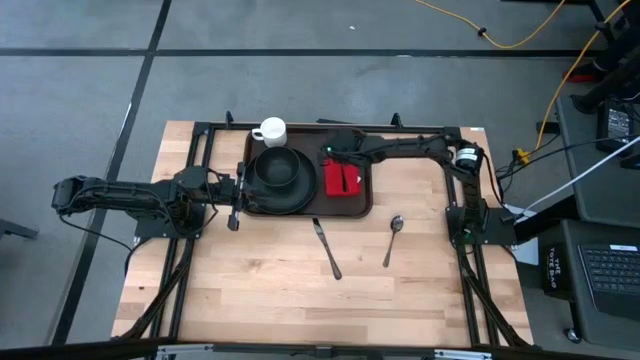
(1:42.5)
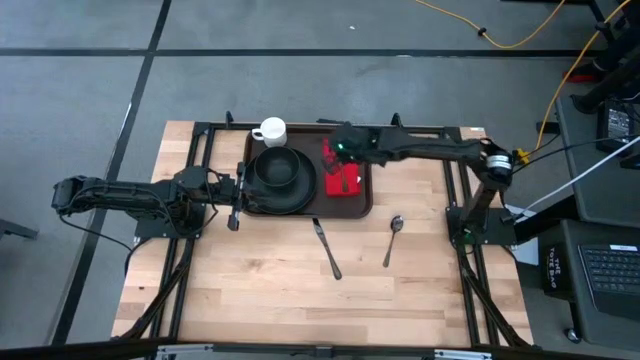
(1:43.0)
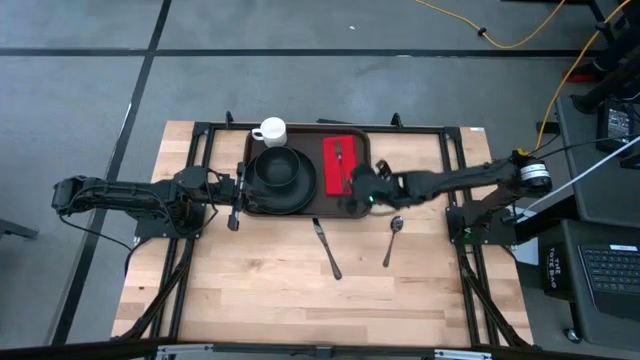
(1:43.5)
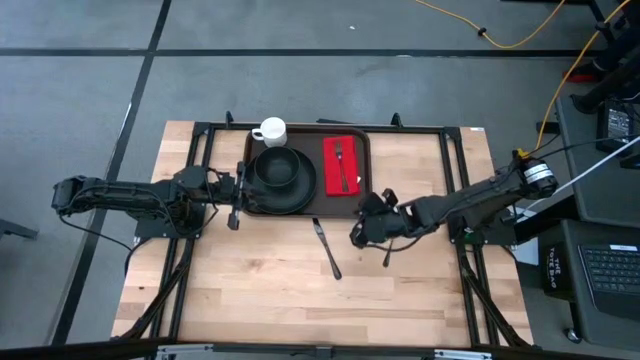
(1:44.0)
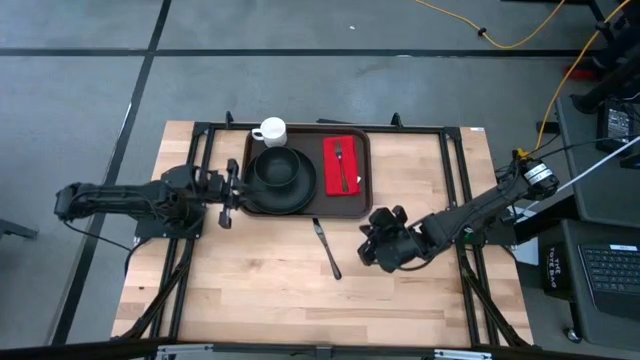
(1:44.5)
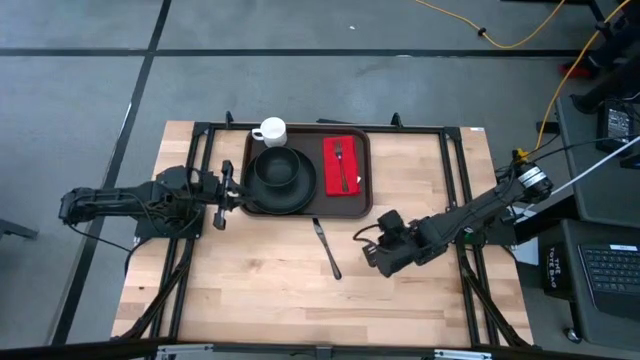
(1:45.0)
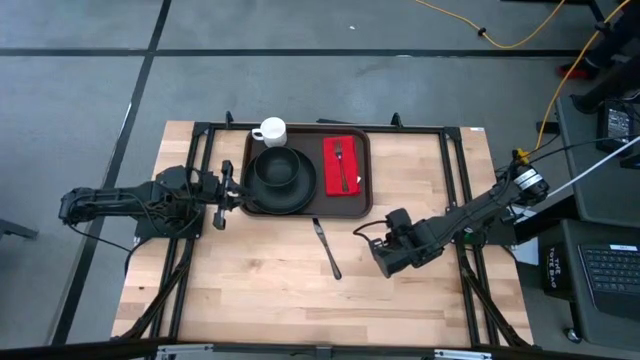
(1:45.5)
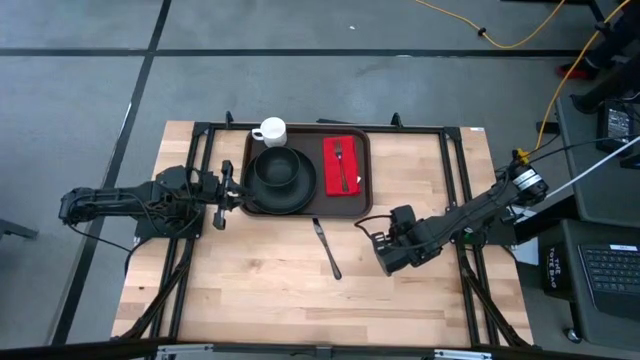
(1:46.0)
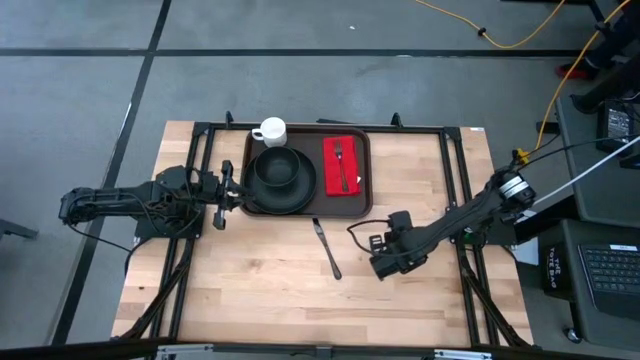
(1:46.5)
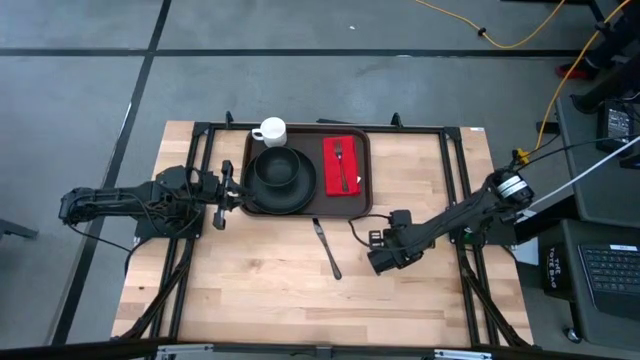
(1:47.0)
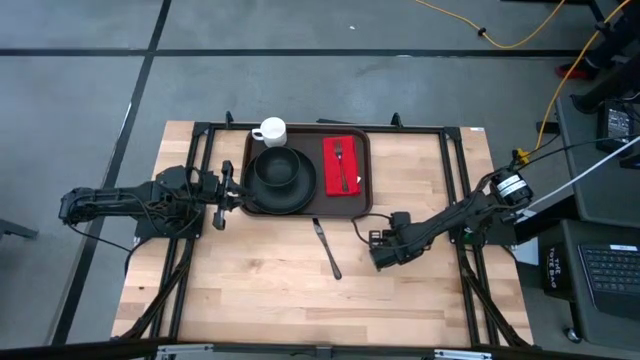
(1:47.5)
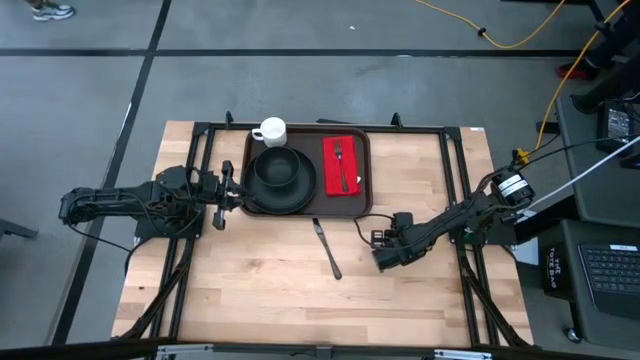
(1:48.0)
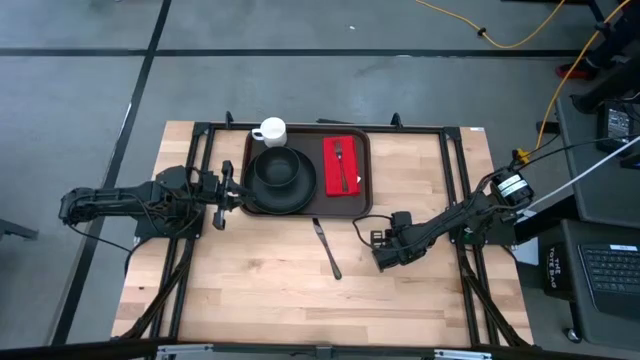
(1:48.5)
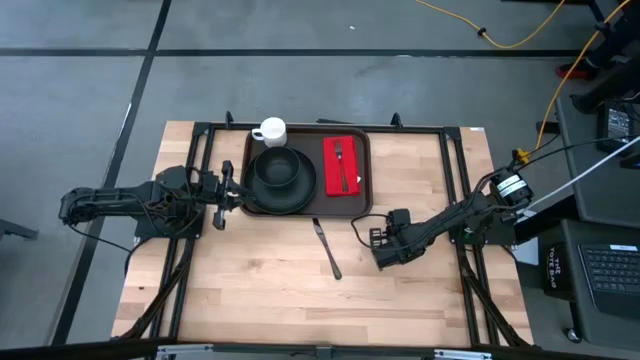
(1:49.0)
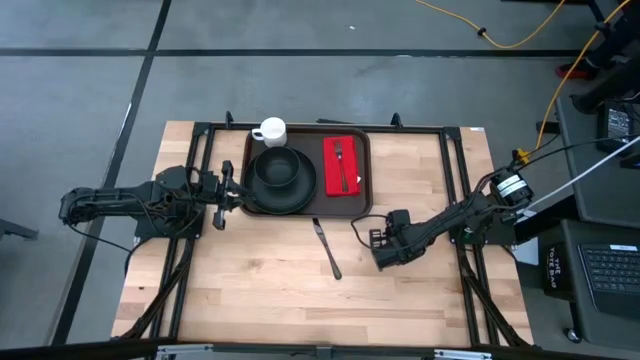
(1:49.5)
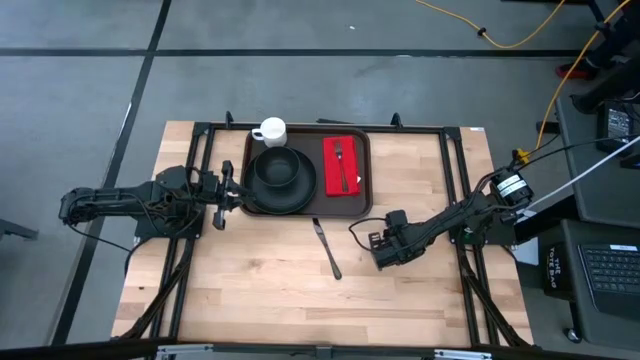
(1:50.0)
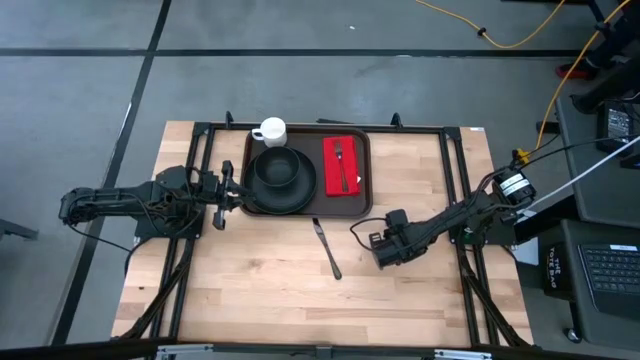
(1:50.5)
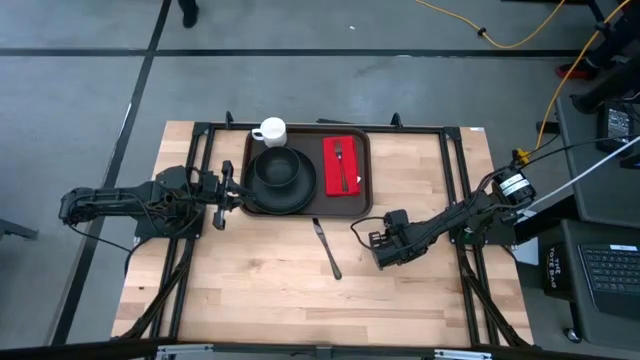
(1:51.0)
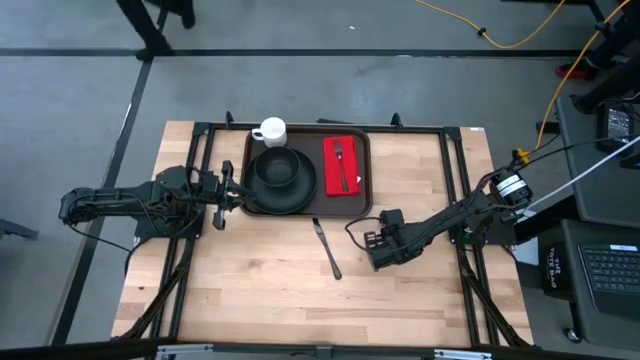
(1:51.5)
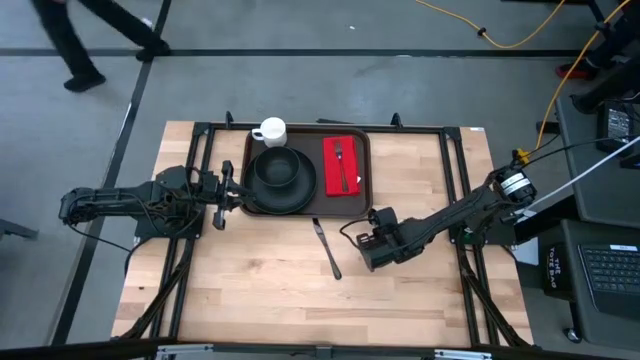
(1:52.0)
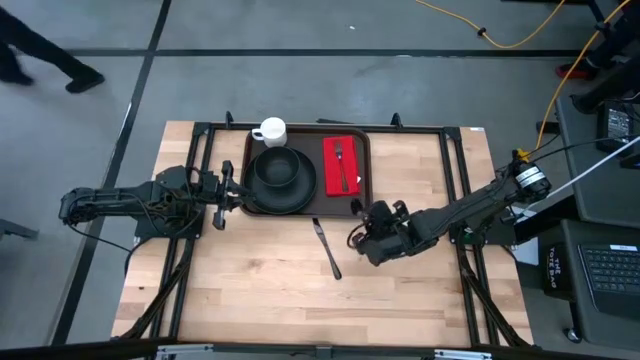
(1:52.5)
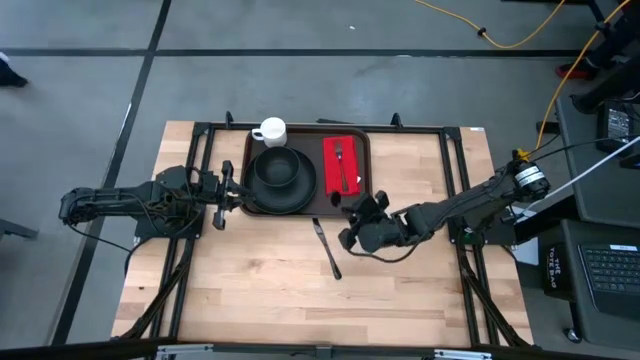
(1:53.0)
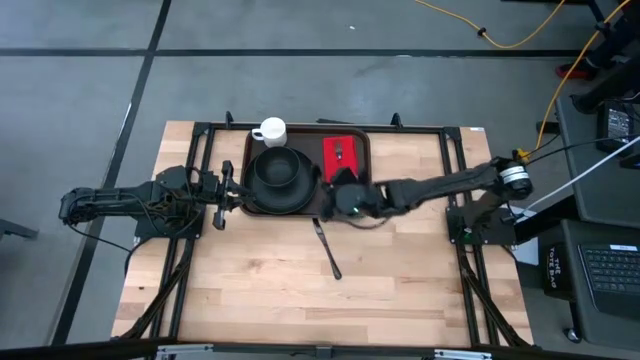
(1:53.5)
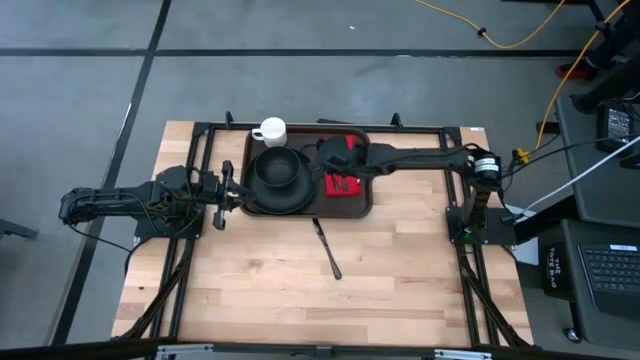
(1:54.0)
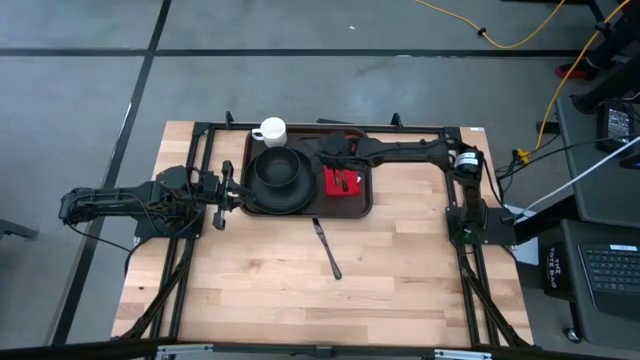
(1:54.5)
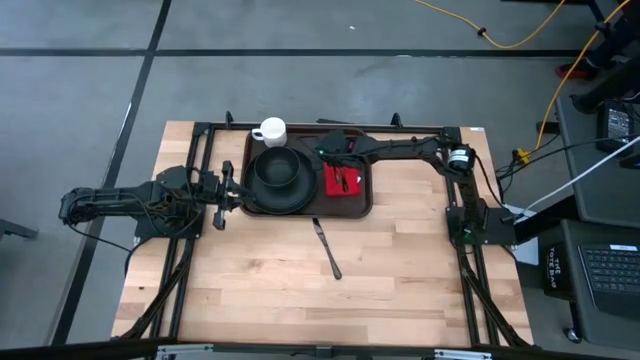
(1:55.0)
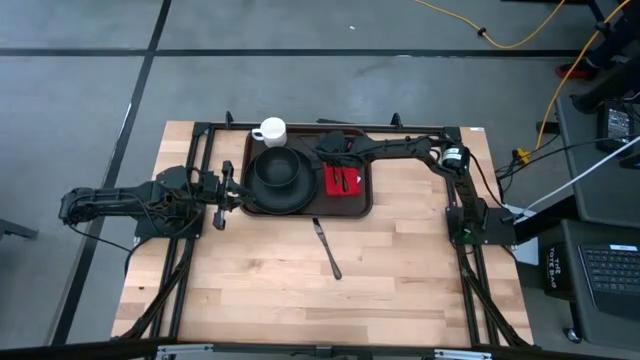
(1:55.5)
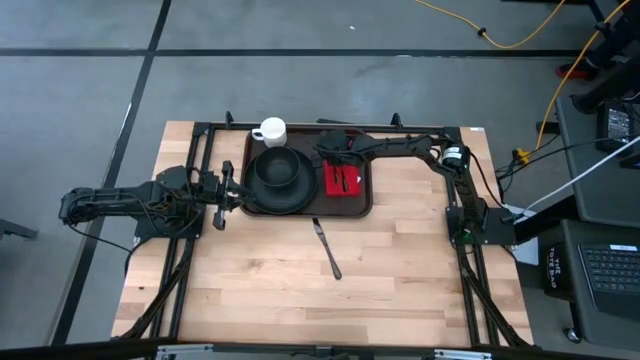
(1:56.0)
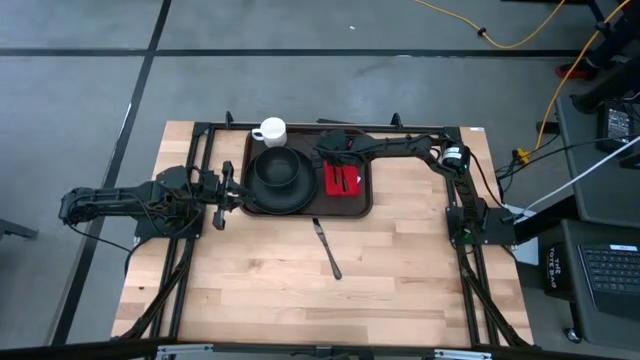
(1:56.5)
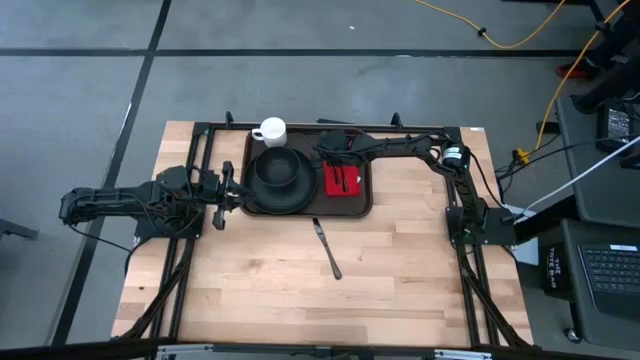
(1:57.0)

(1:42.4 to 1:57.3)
Task: Set up tray
Put the silver spoon on the red napkin to the left of the silver fork

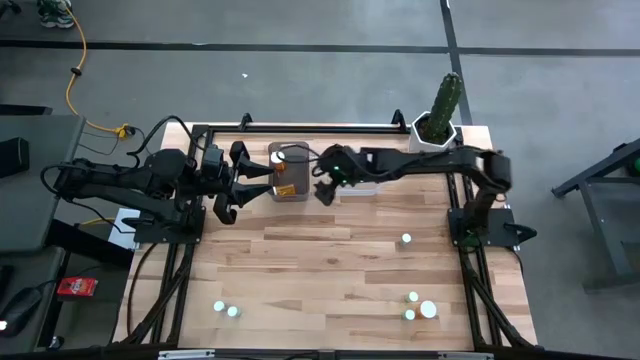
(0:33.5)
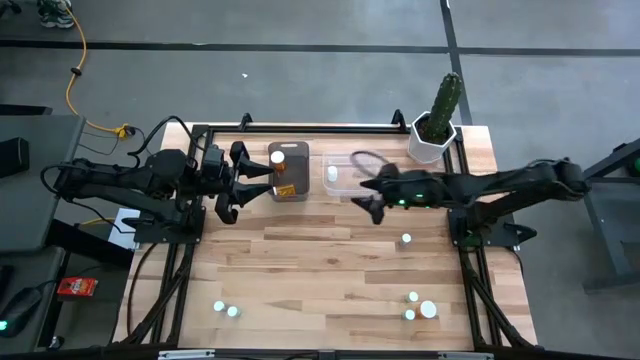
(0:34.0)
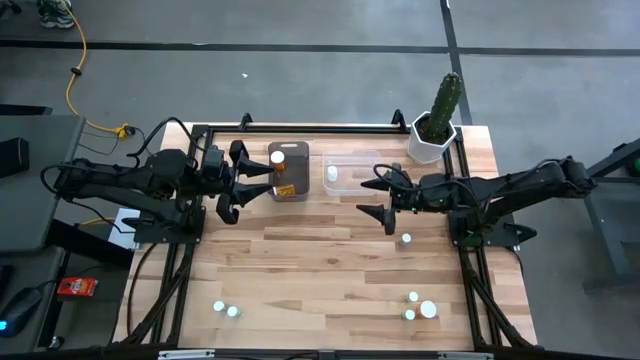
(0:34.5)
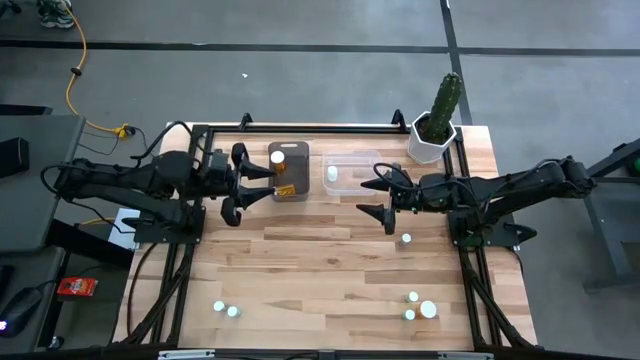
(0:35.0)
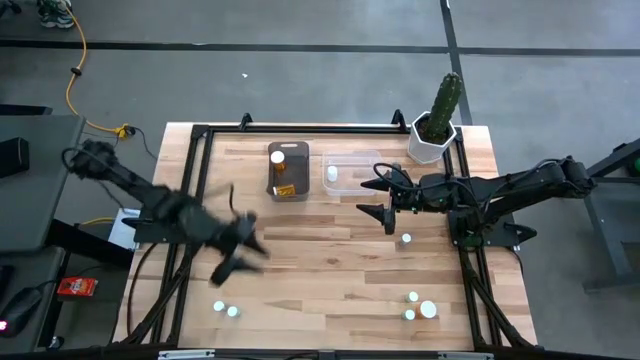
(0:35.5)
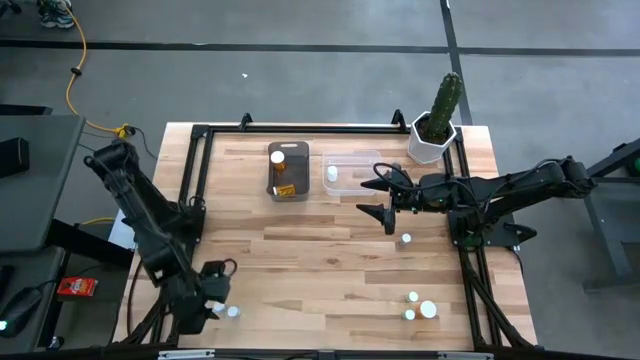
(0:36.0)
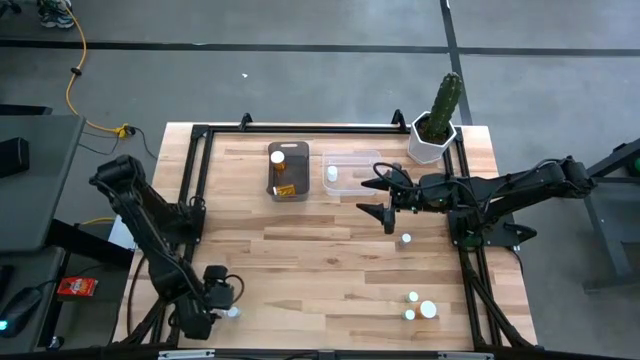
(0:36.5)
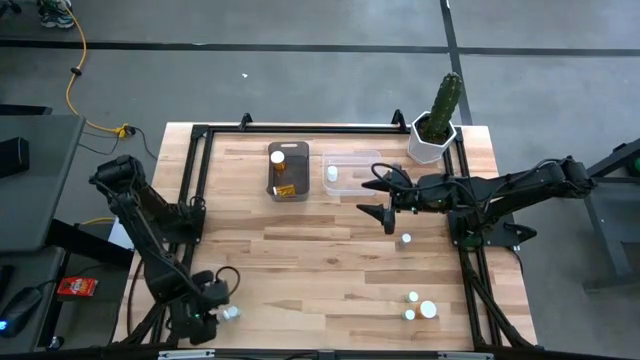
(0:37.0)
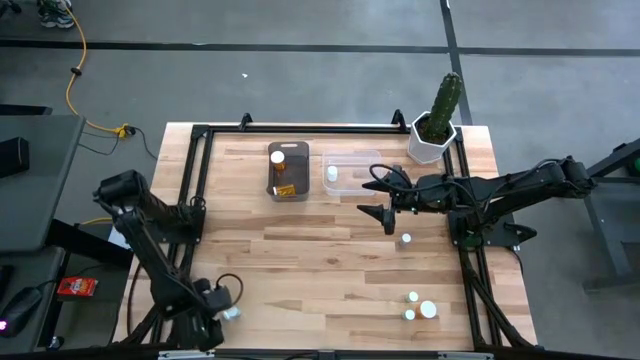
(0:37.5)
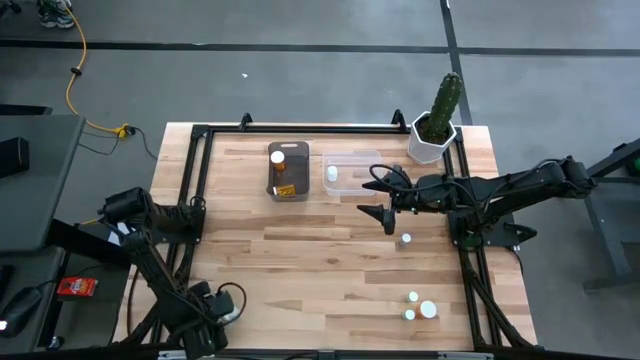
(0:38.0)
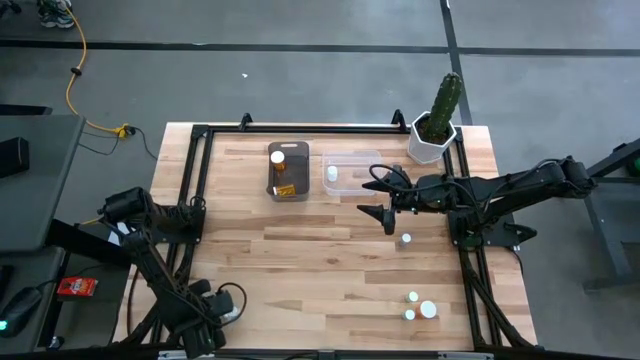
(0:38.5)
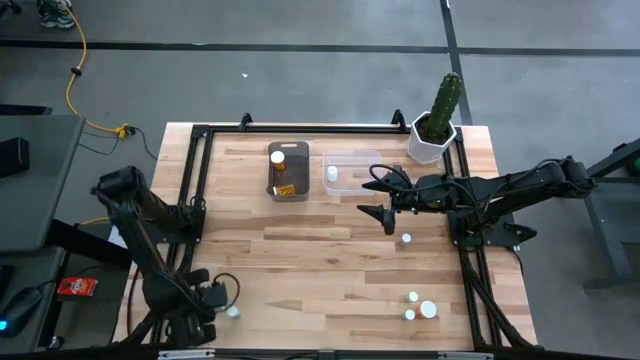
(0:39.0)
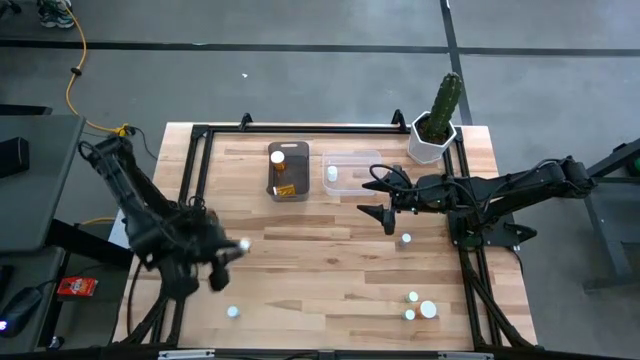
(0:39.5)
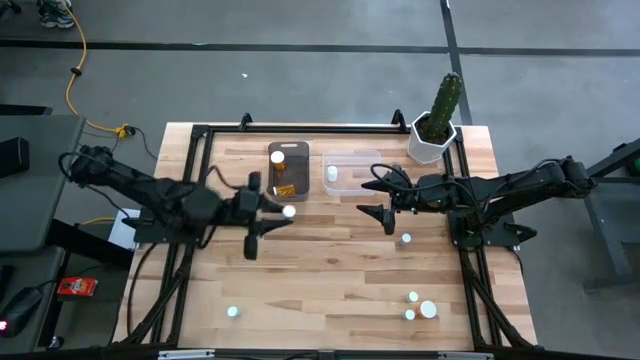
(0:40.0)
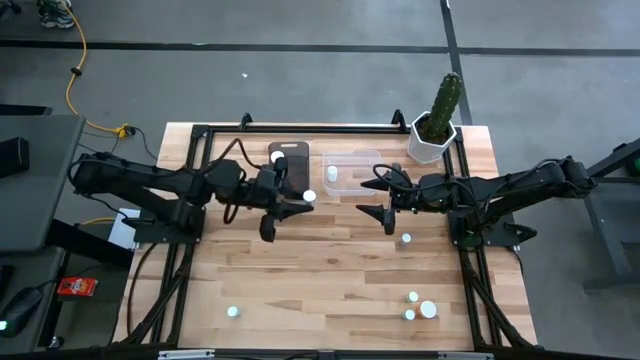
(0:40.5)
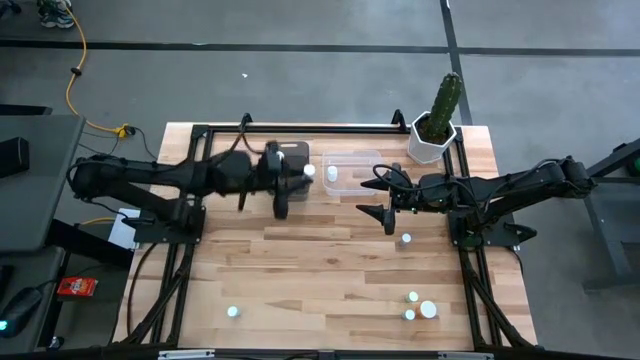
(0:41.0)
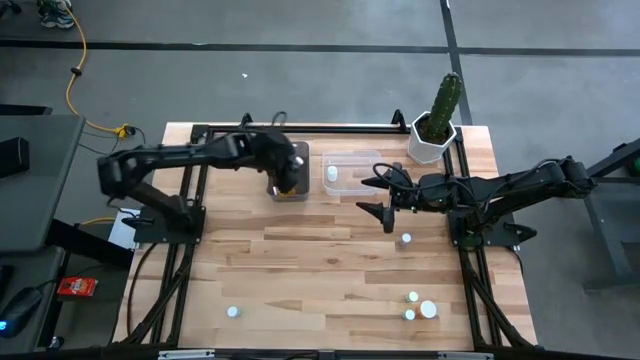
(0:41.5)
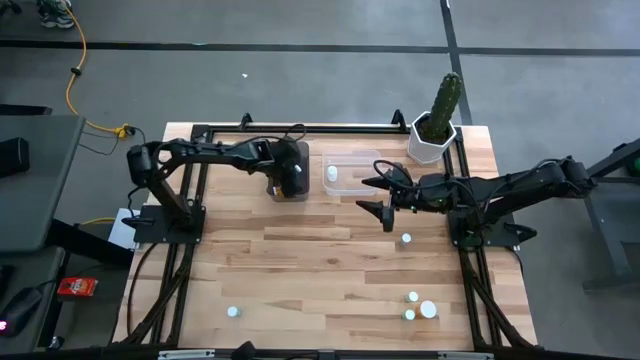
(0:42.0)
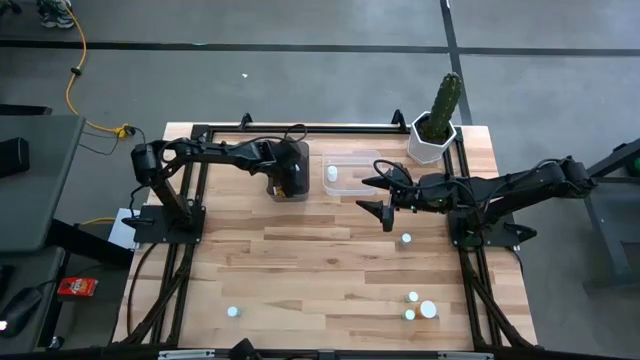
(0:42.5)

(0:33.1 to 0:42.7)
Task: Pick and place medicine bottles into bin by pill shape (circle, oval)
Put the bottom green capsule bottle into the black bin
